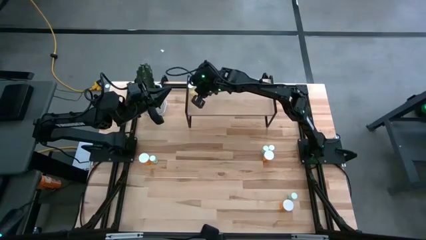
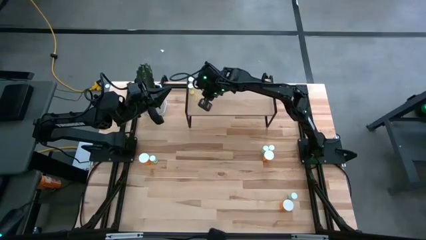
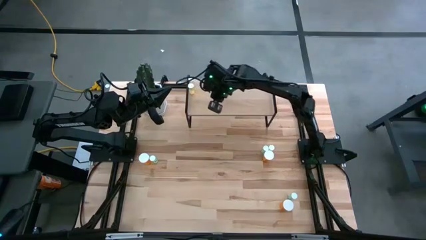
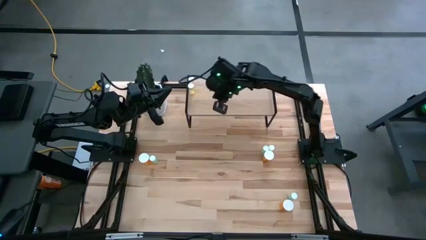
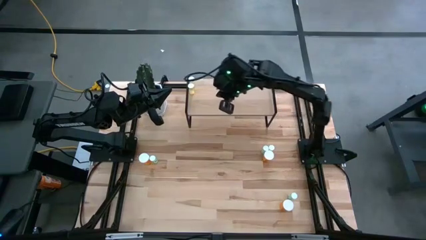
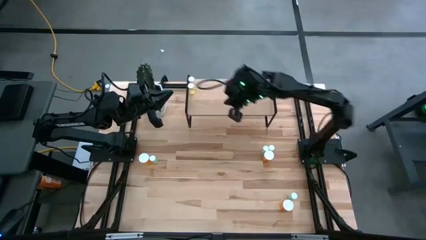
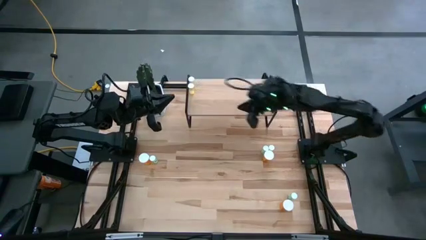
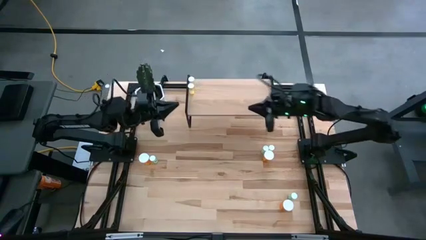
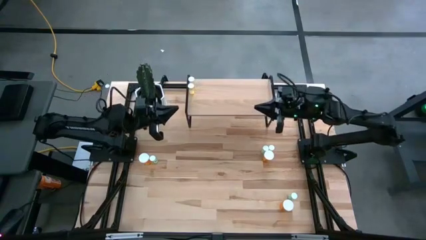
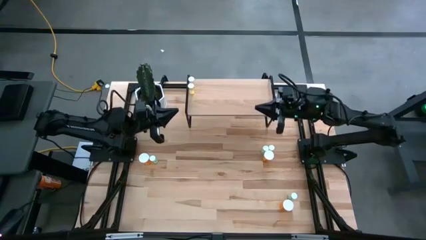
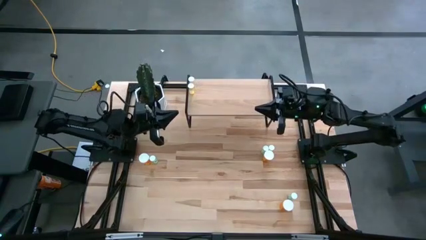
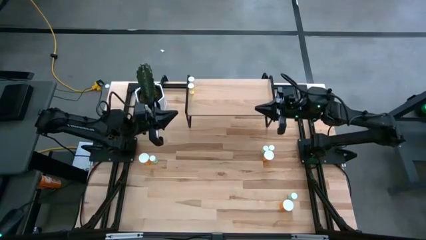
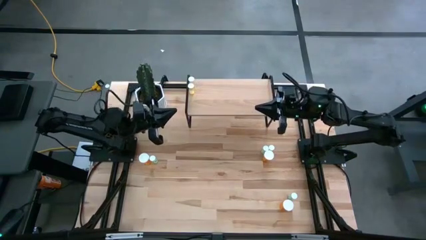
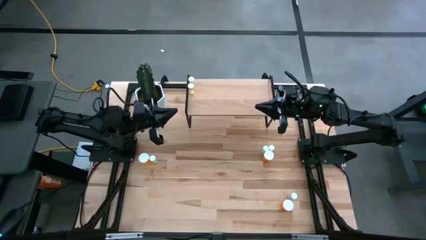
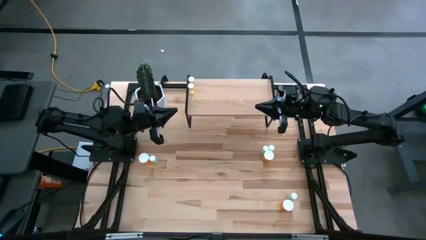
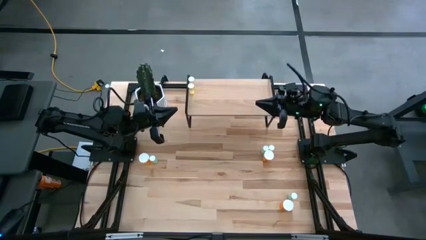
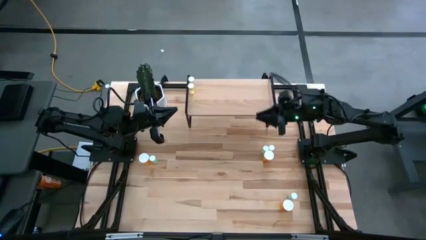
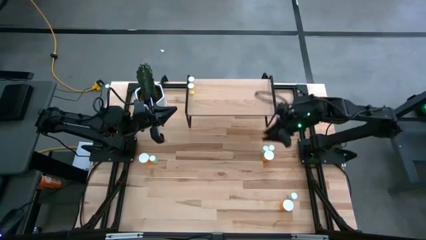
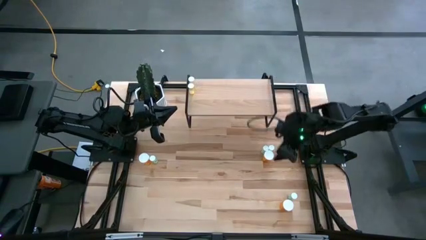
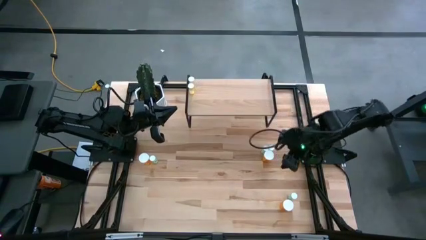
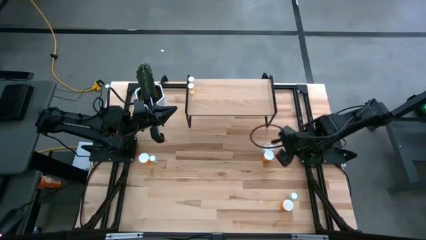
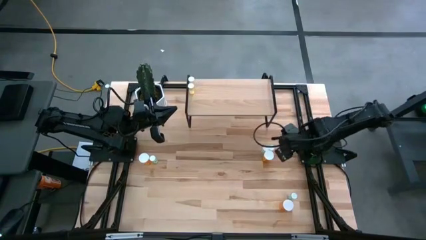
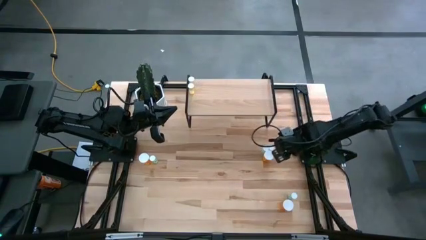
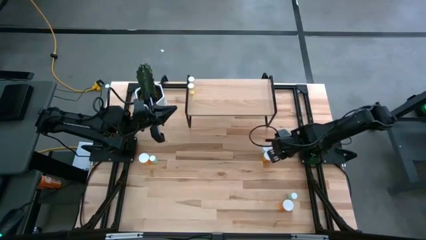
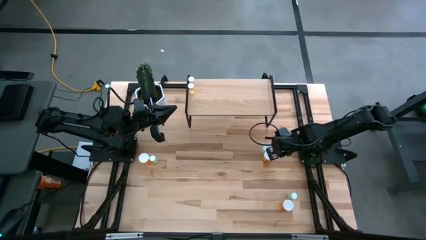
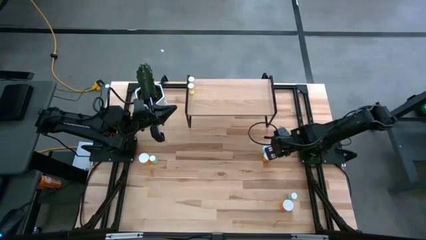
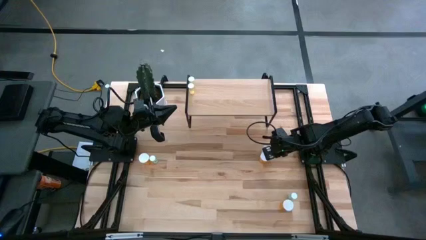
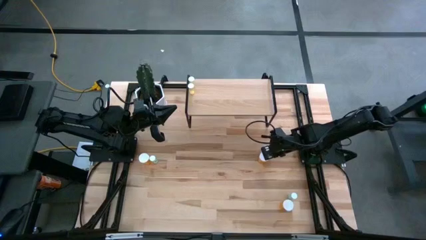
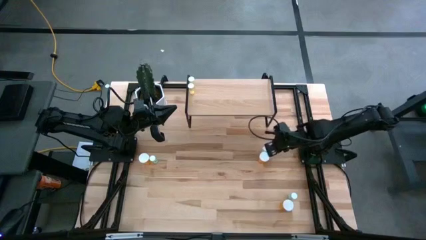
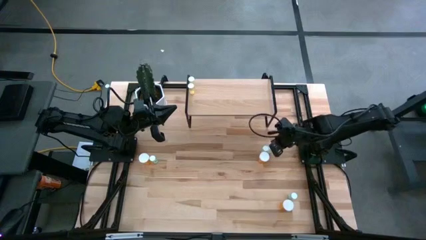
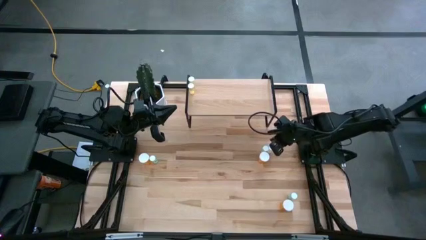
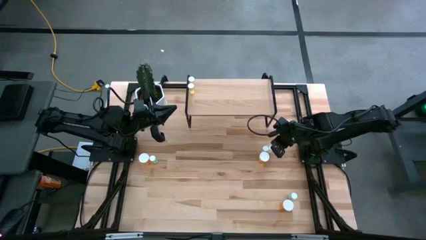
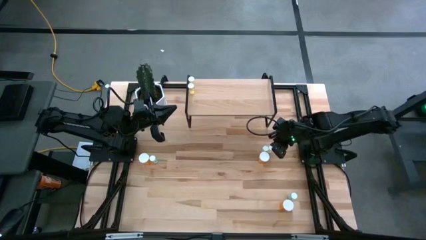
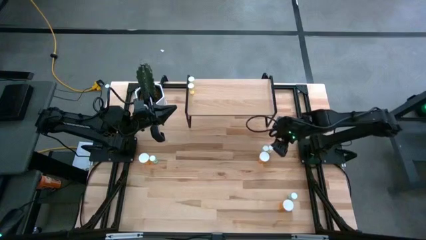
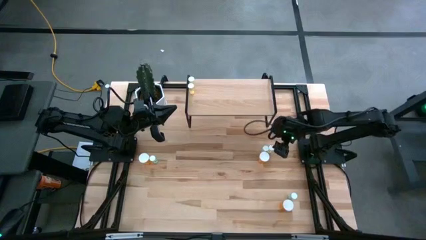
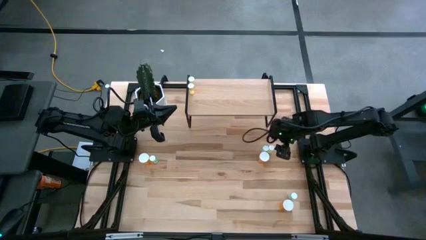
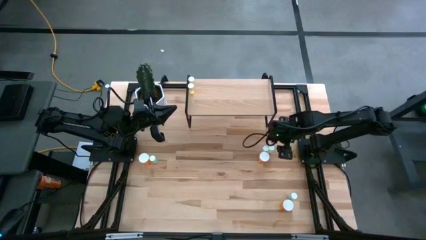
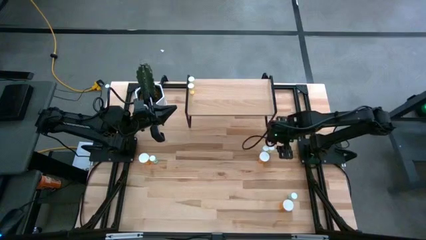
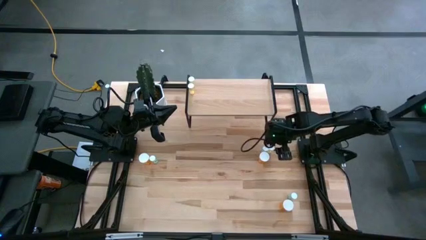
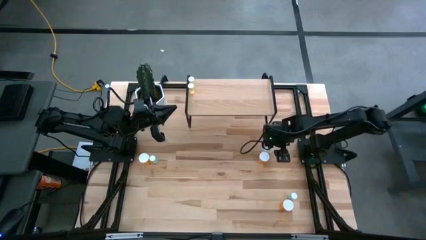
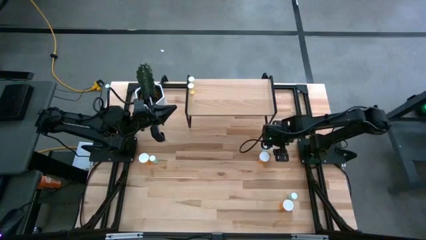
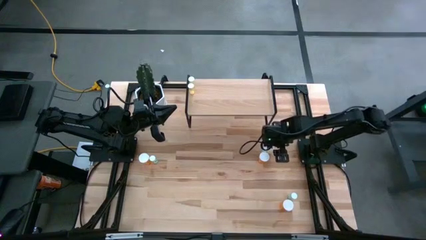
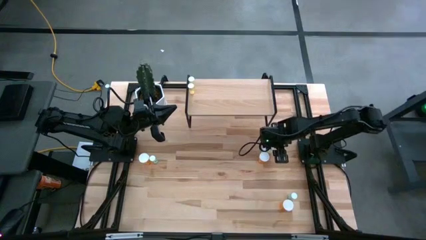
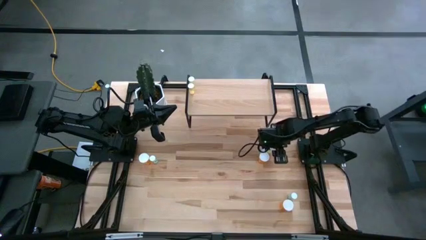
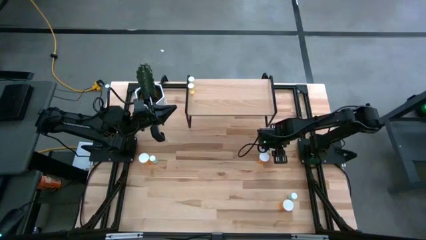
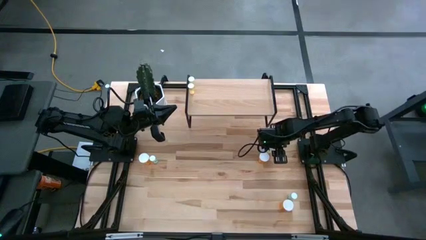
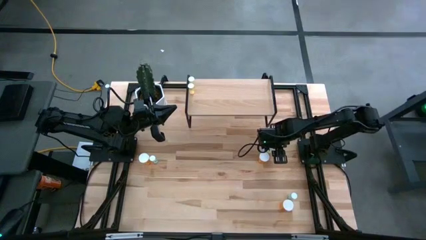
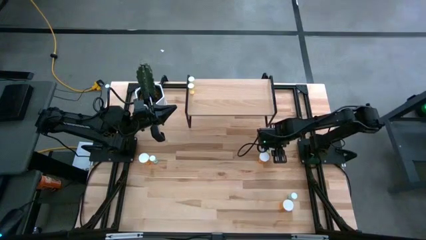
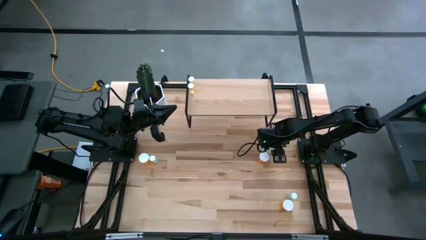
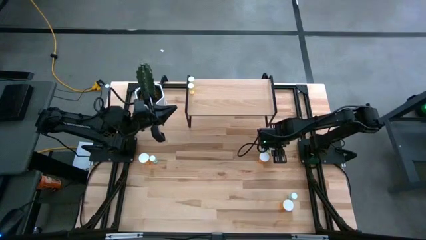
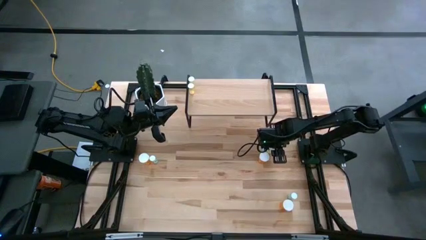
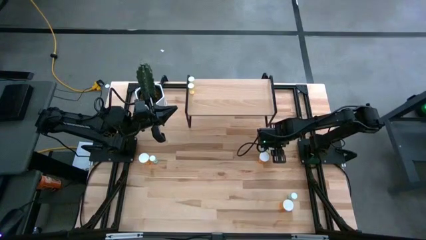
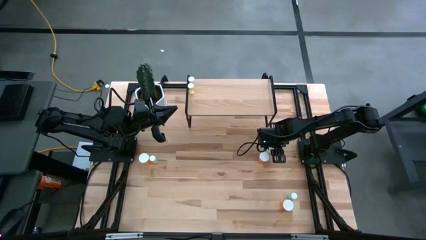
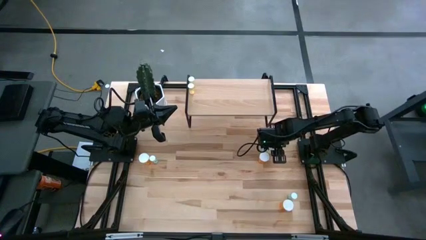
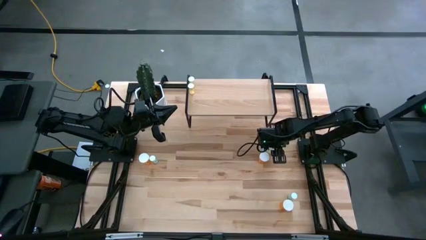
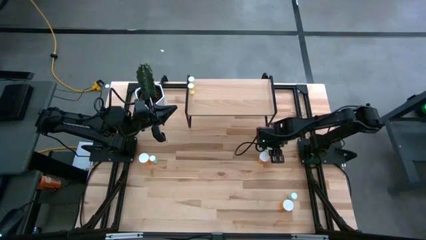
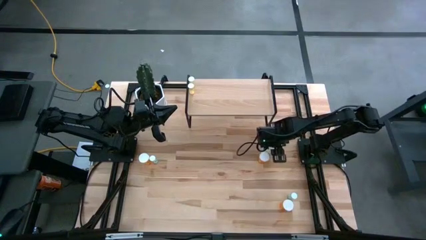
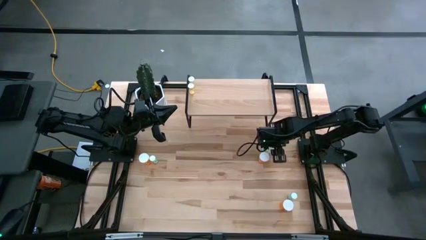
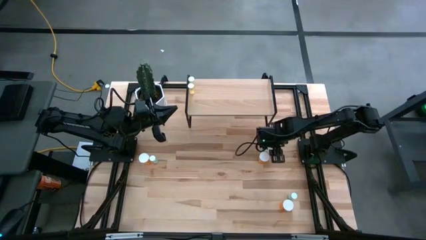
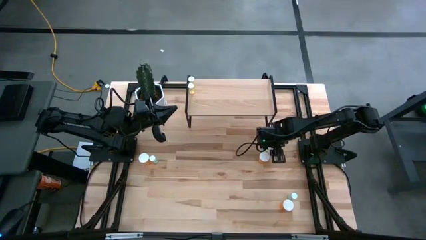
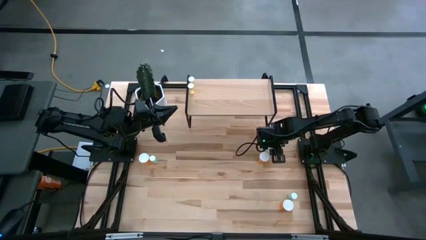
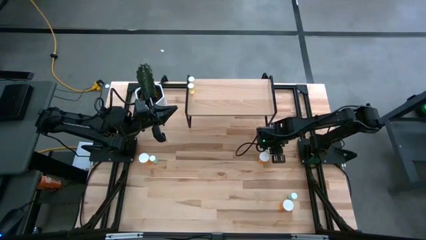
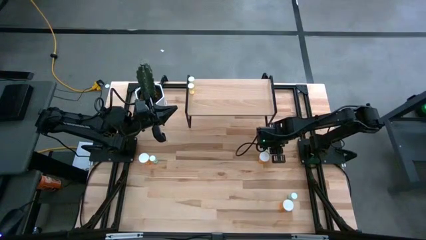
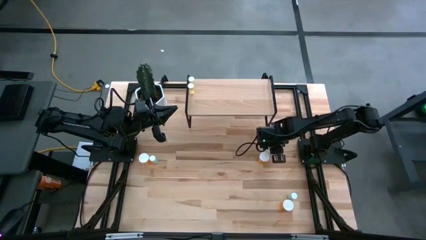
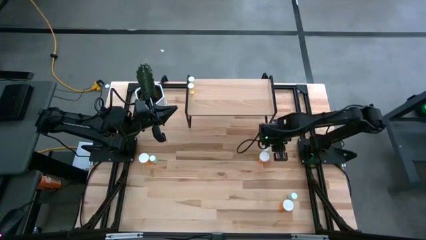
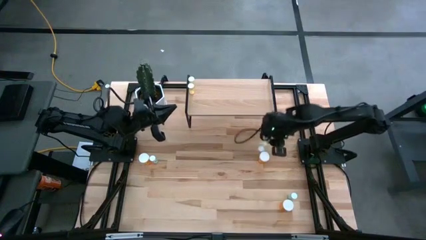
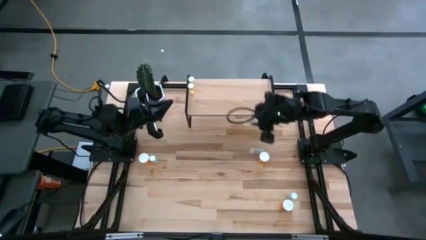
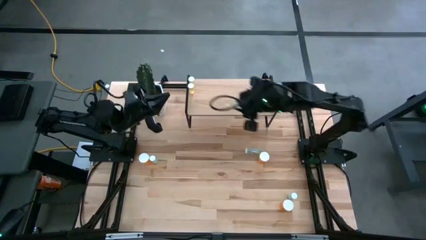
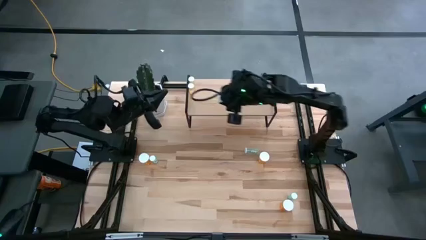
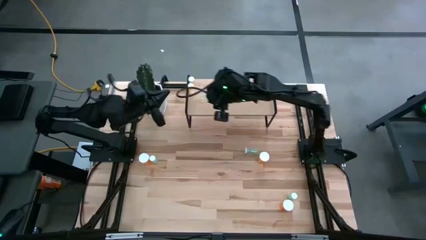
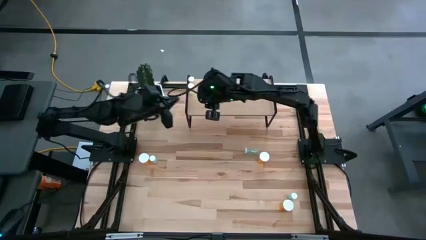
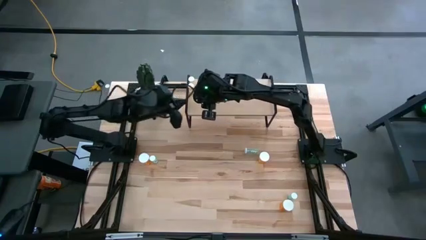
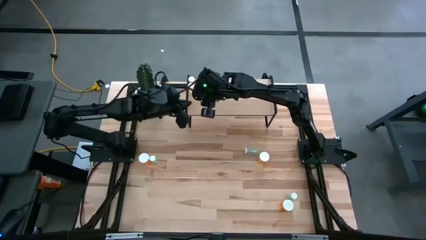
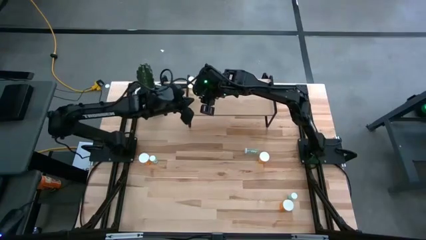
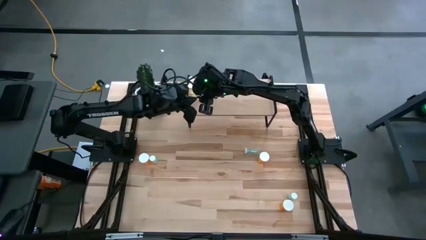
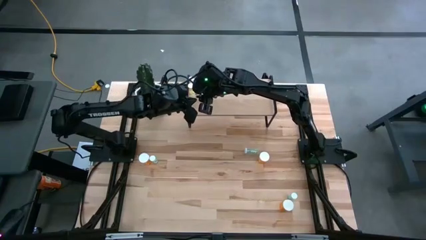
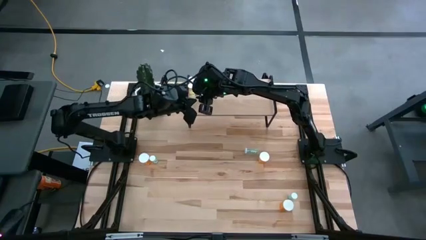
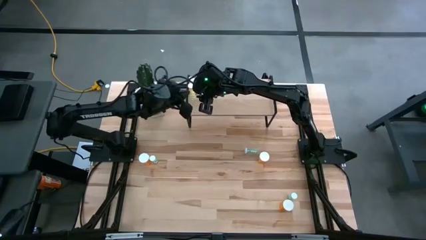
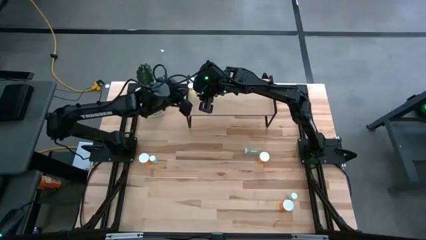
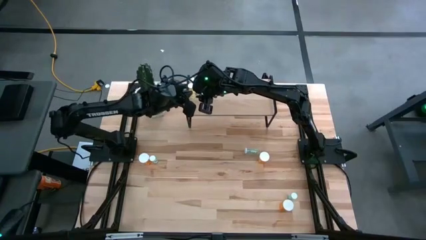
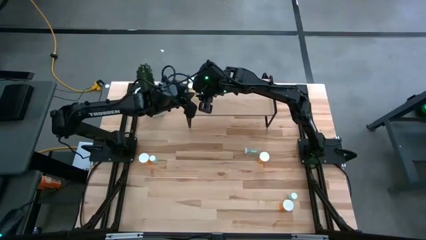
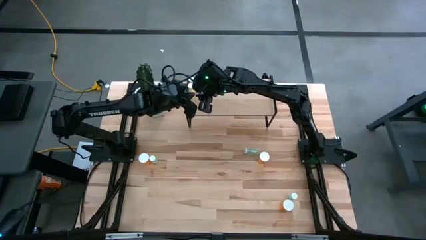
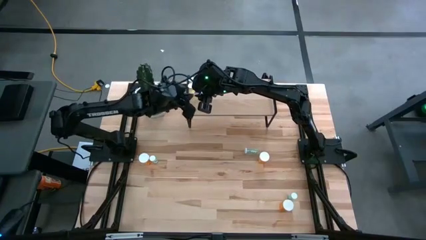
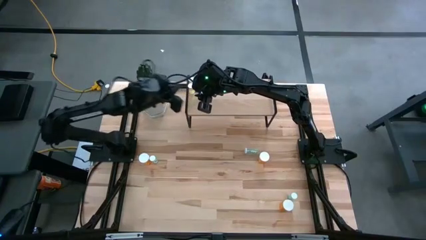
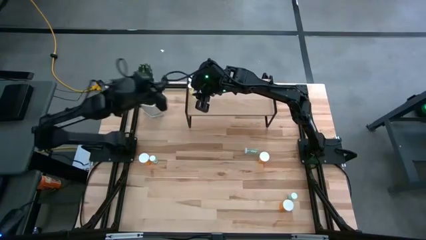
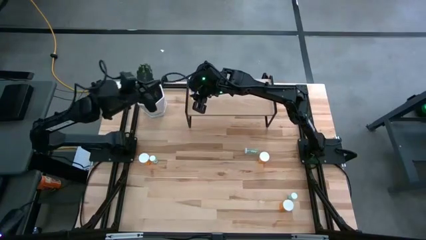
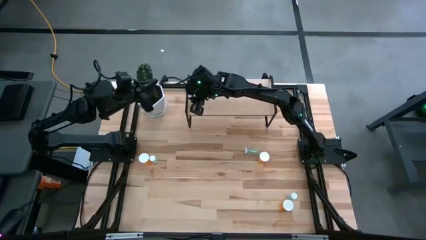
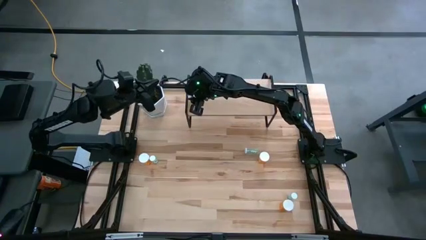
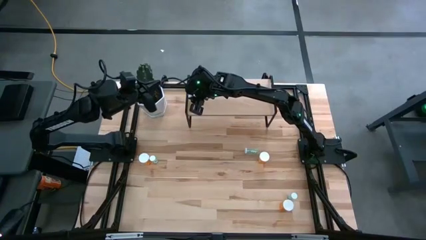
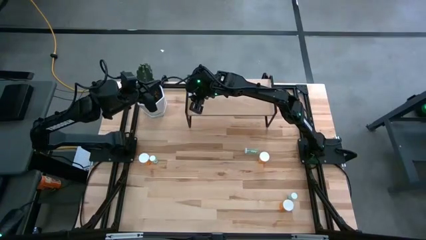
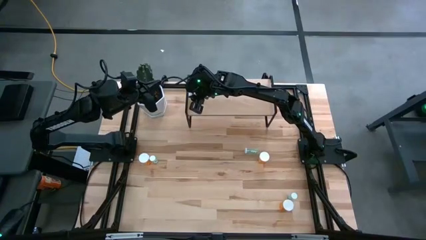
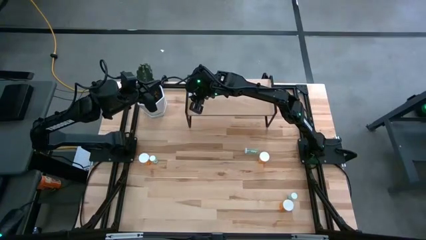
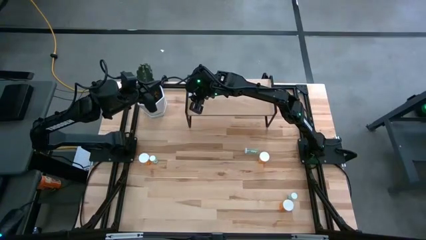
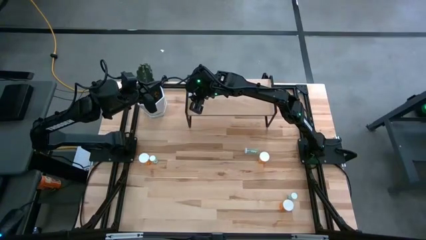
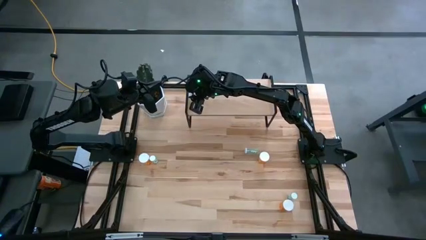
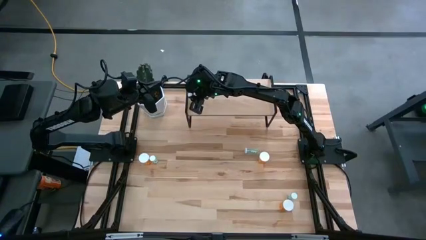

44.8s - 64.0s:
Task: Pick and place medicine bottles onto shelf by color
Align the yellow pill bottle with the other yellow pill bottles on the shelf
